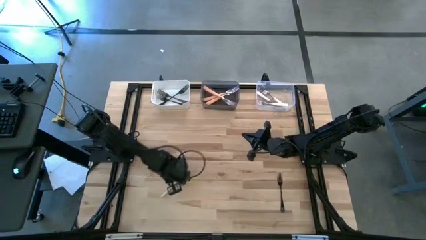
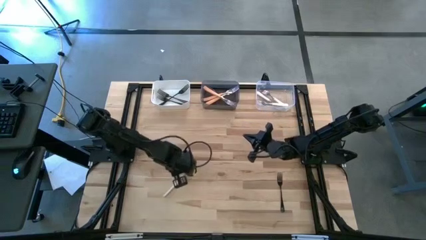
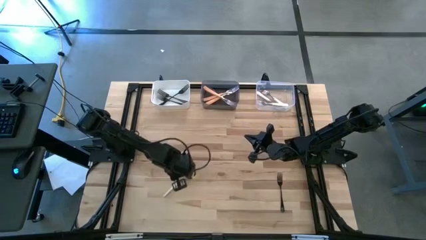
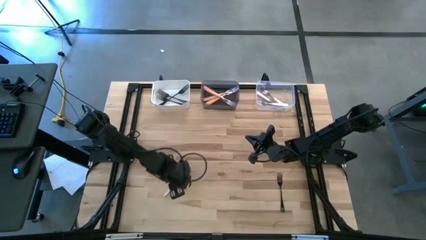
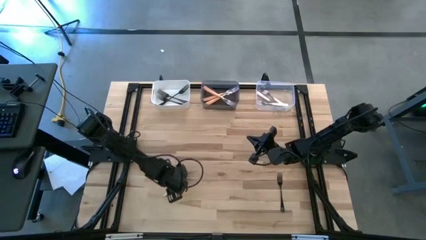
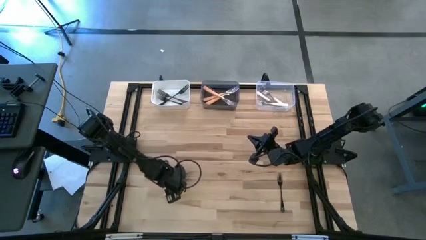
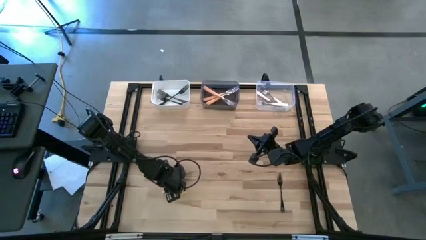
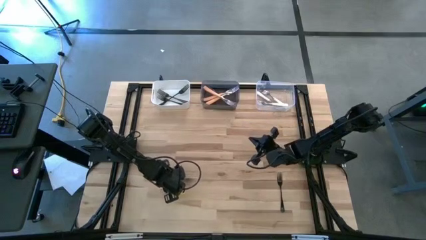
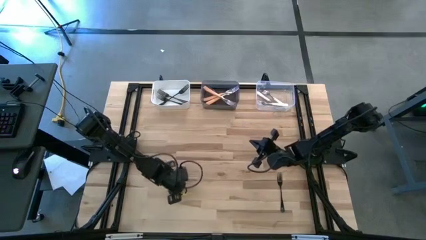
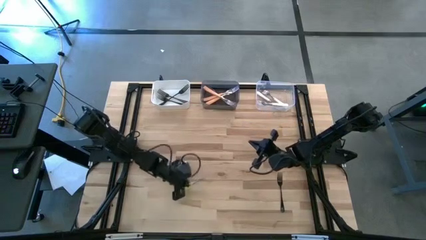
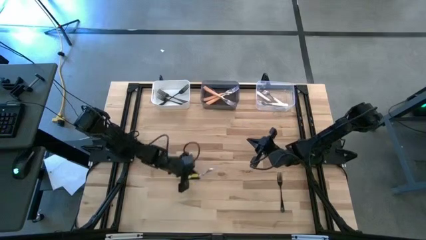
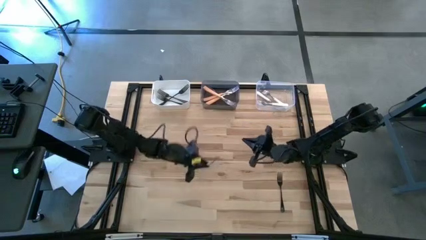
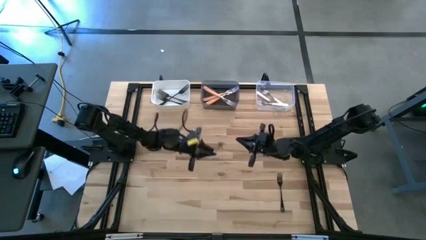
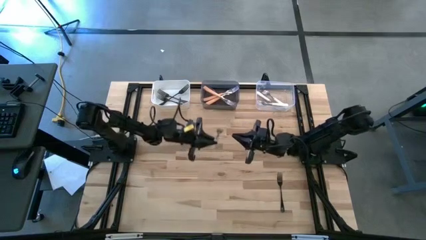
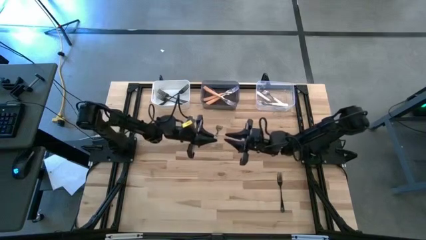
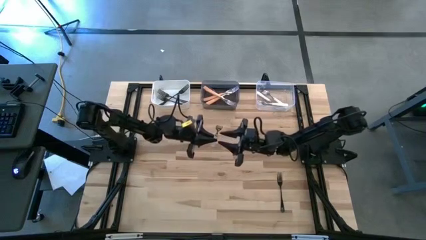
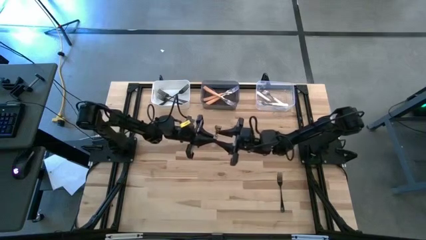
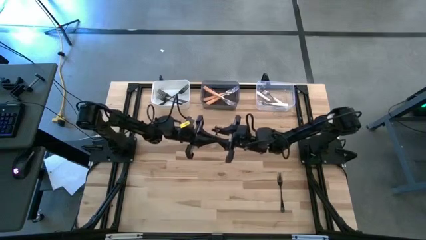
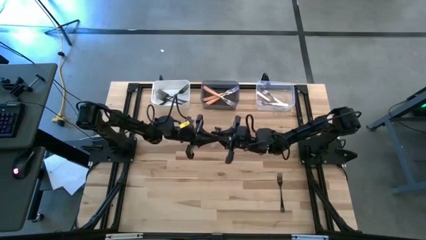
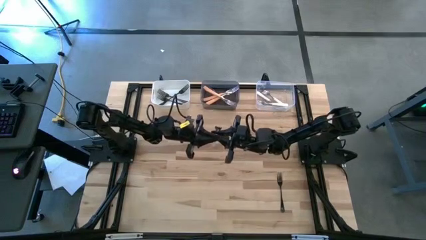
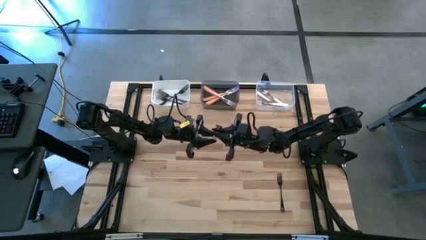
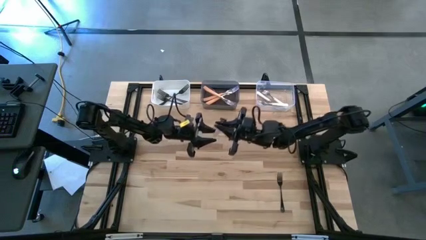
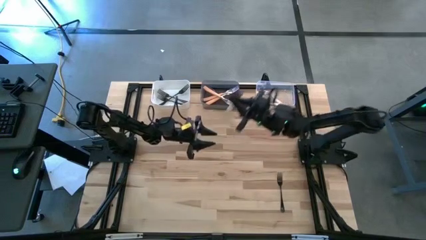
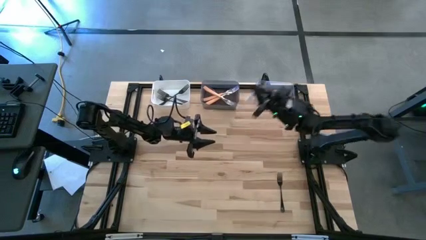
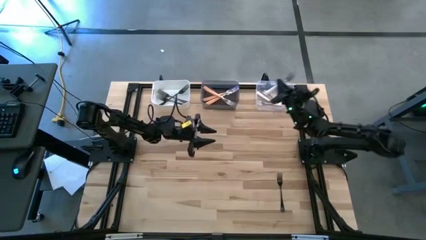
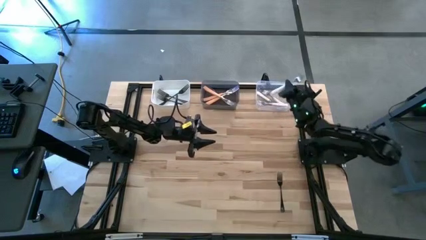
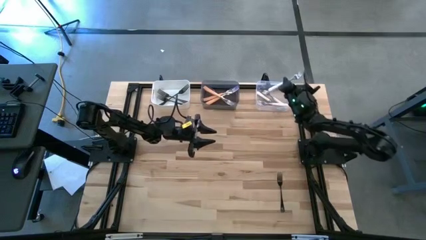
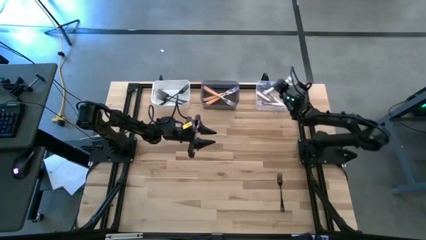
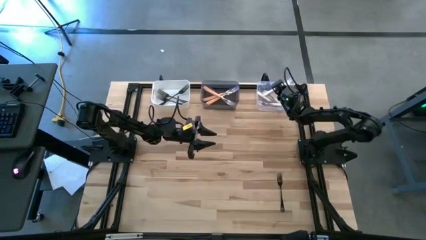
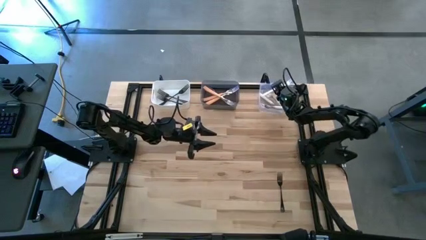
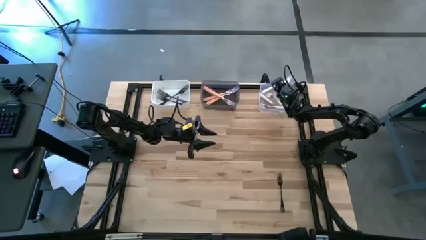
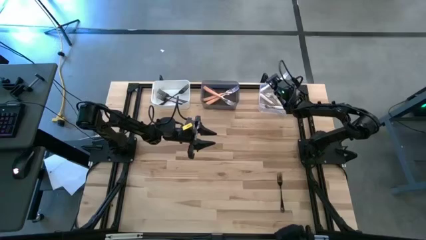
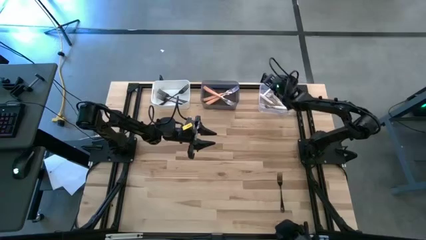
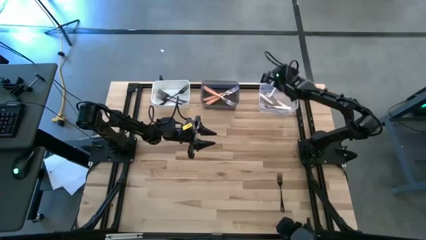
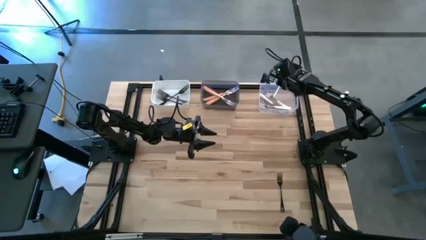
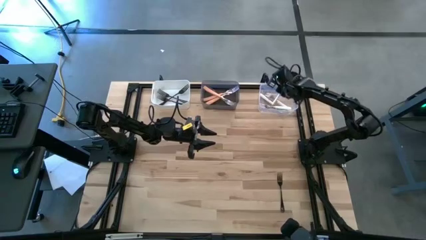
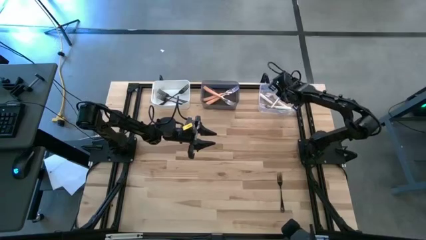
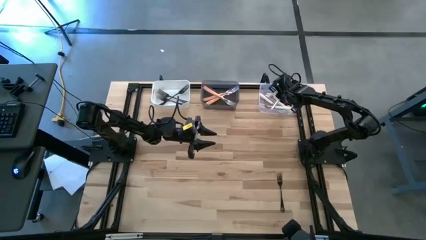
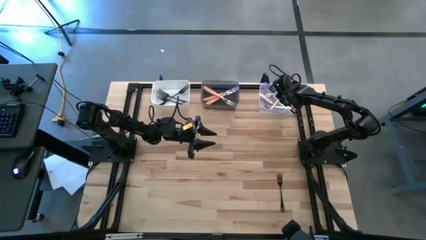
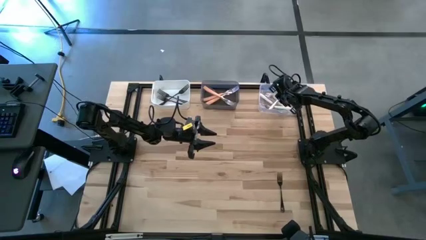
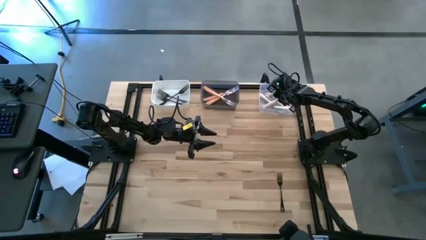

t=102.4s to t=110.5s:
Task: Sort silverware by color (type)
Put the white fork into the transparent bin

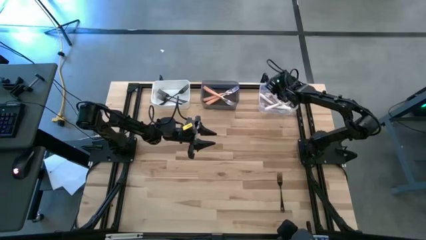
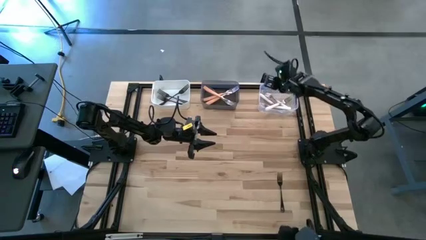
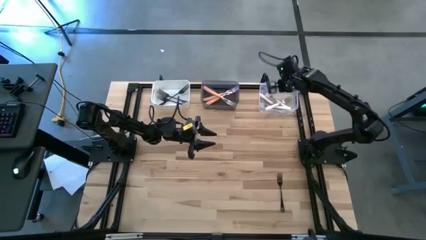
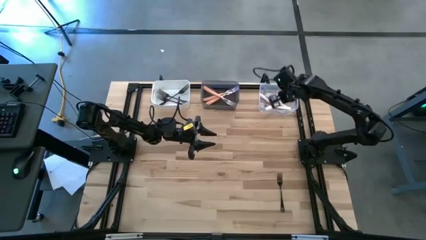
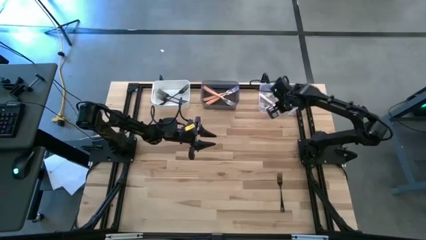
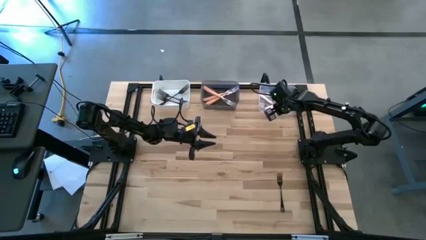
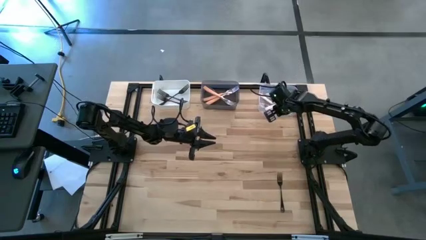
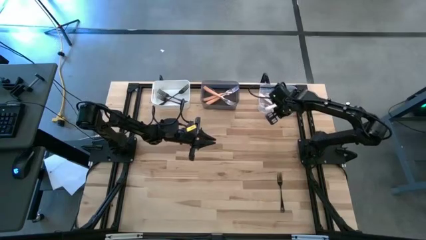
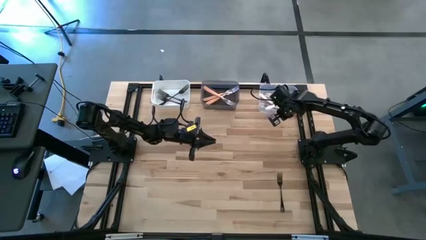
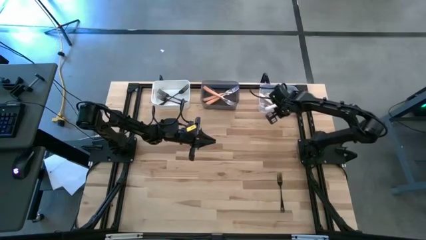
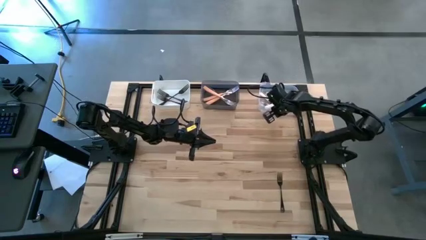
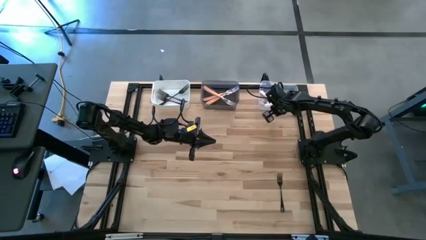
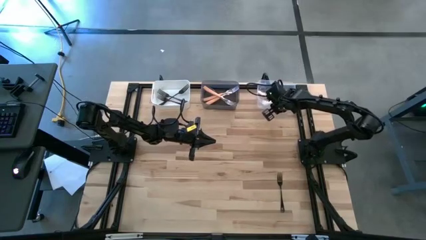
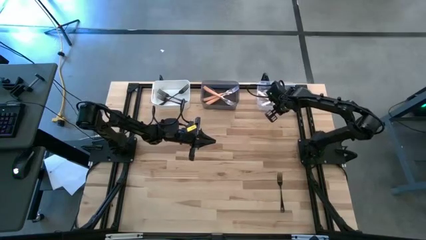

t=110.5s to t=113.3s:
Adjust the transparent bin

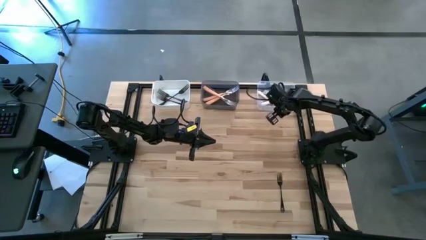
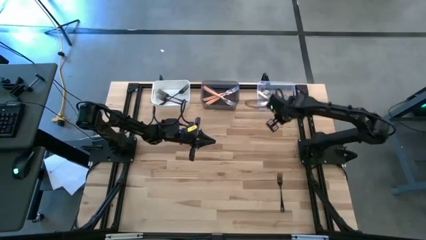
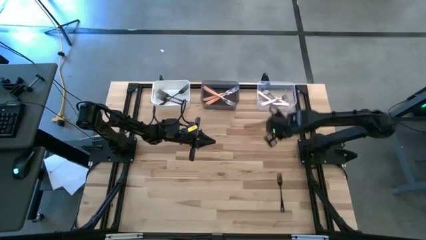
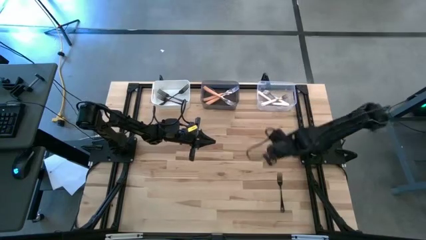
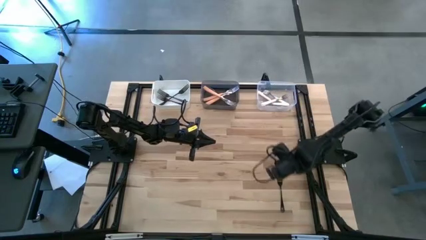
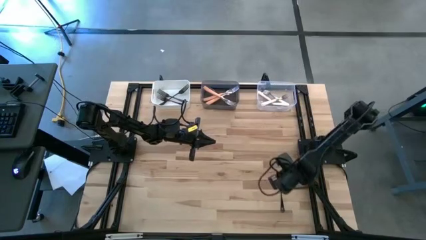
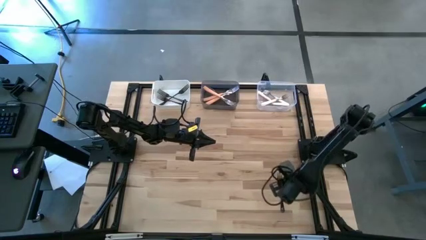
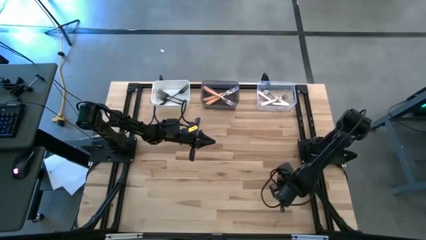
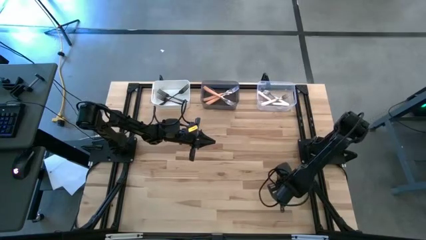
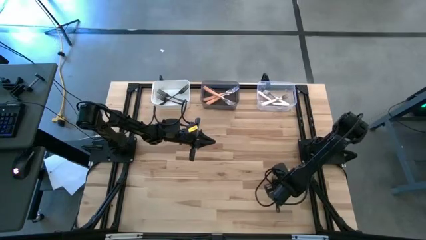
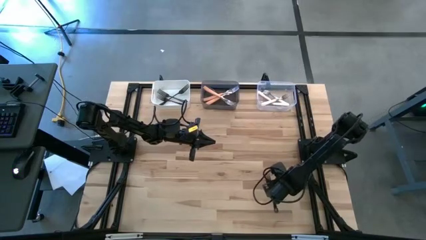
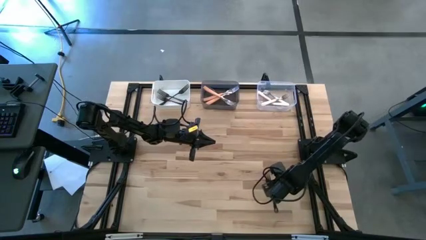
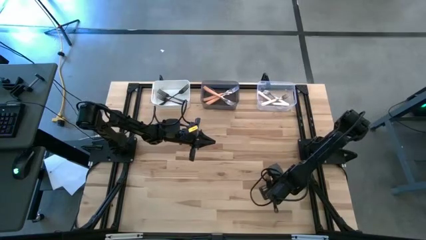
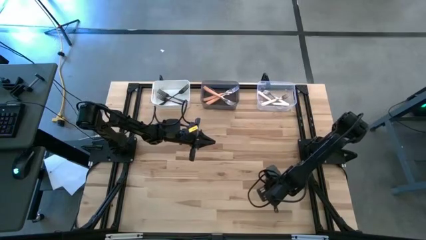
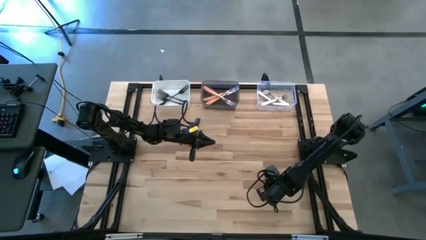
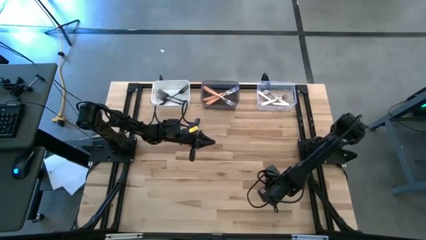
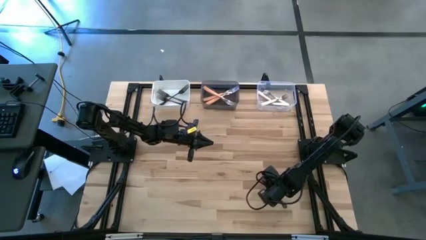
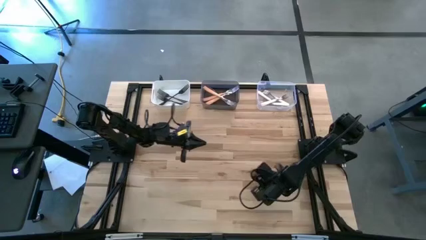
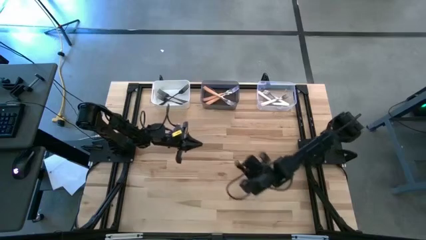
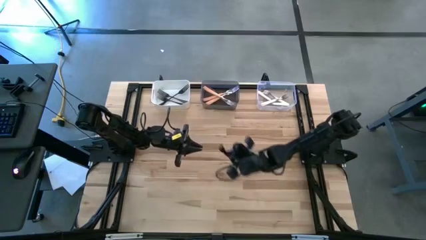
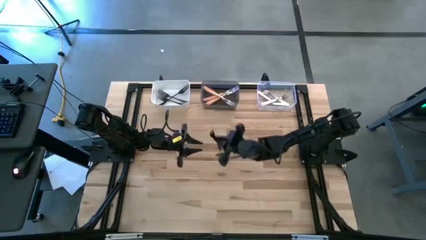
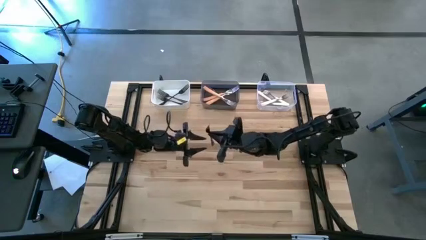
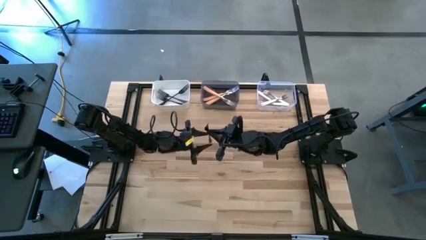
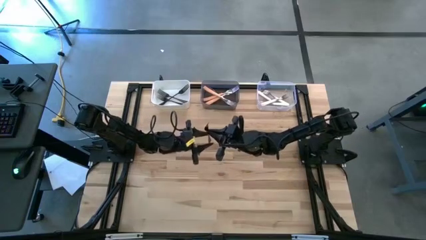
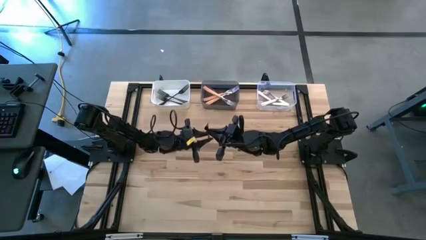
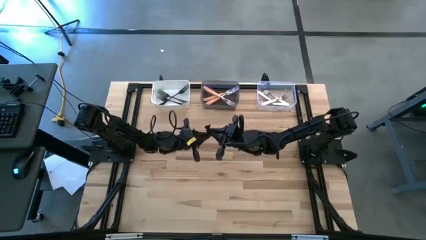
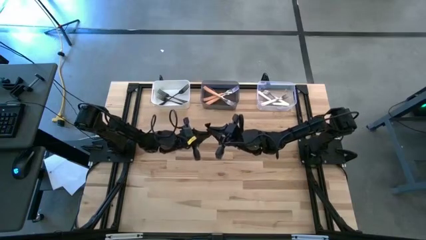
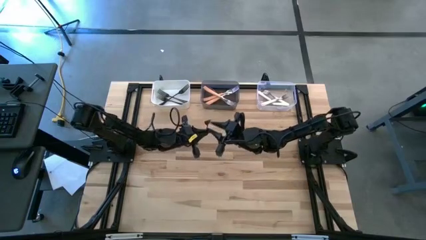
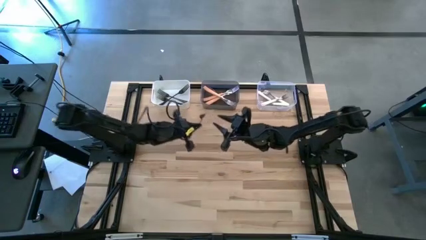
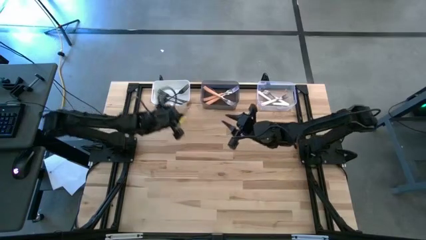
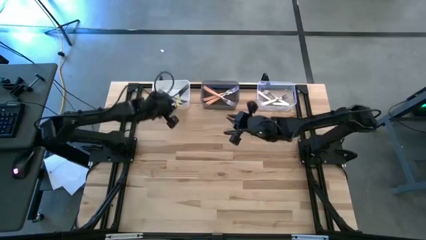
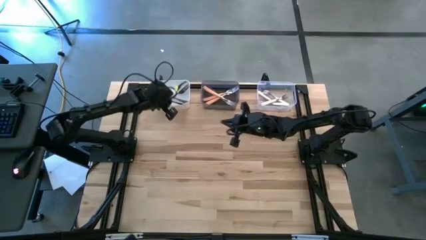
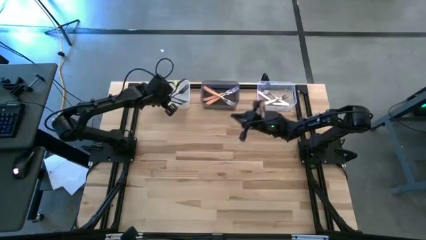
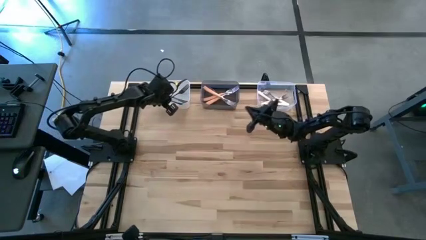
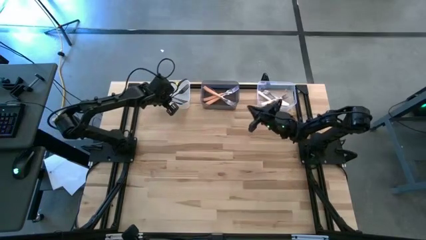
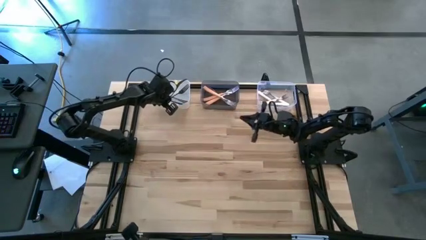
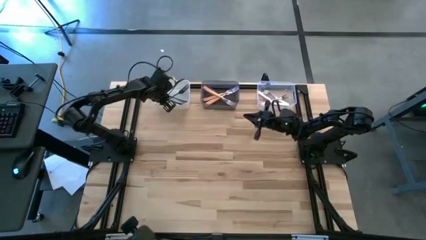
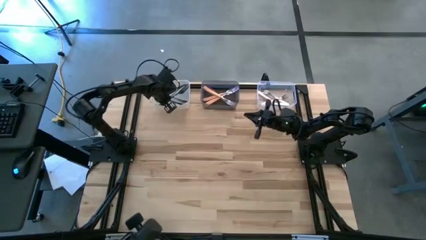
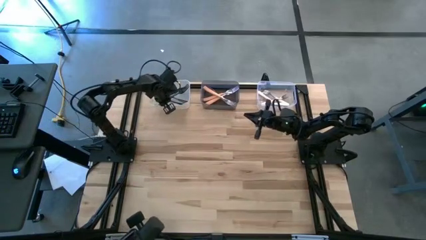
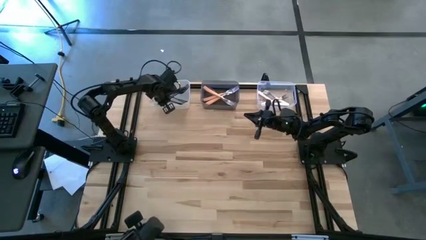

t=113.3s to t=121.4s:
Put the black fork into the white bin
